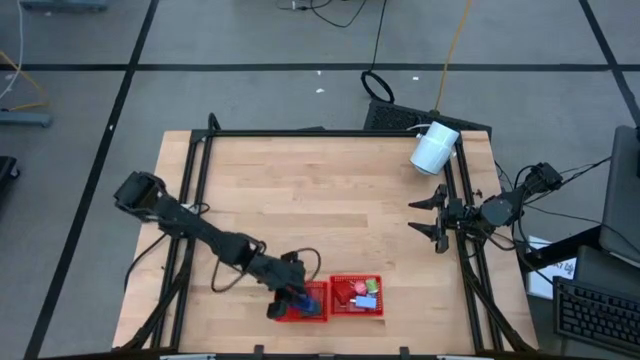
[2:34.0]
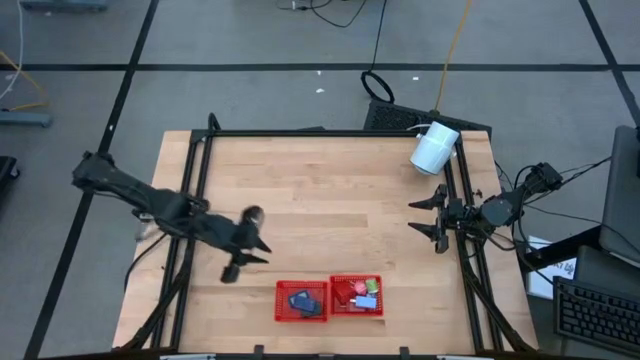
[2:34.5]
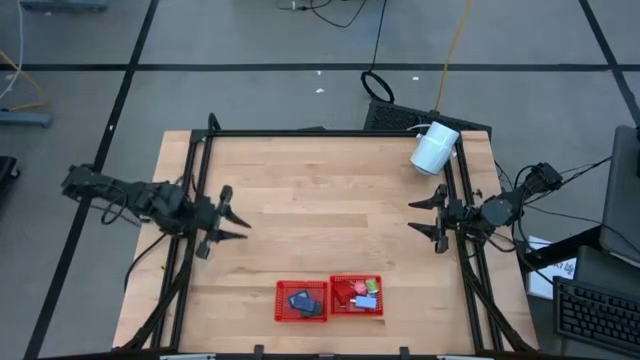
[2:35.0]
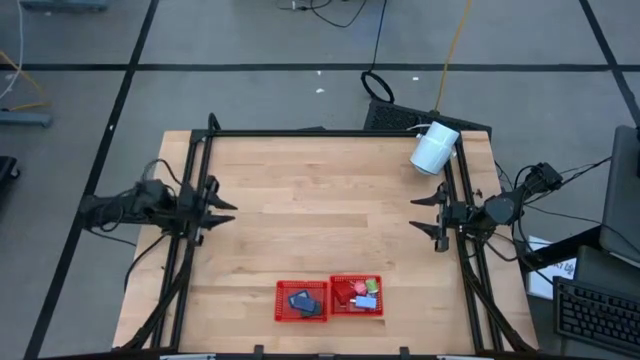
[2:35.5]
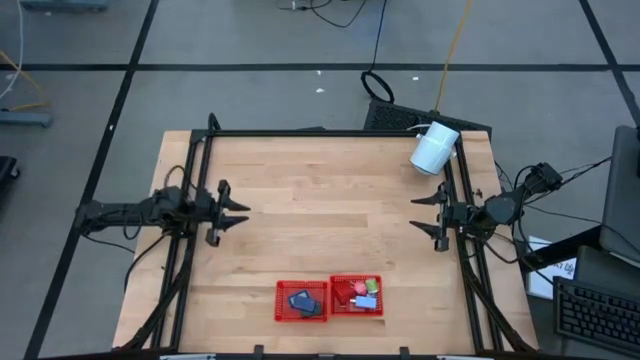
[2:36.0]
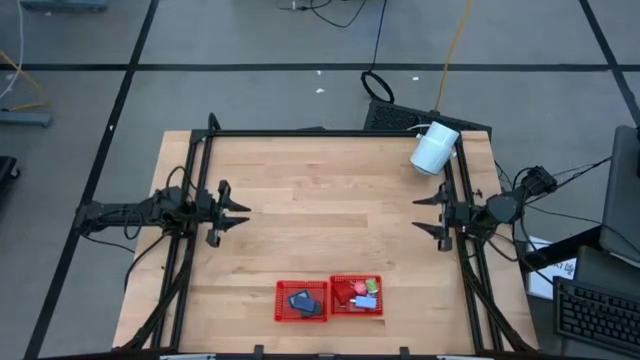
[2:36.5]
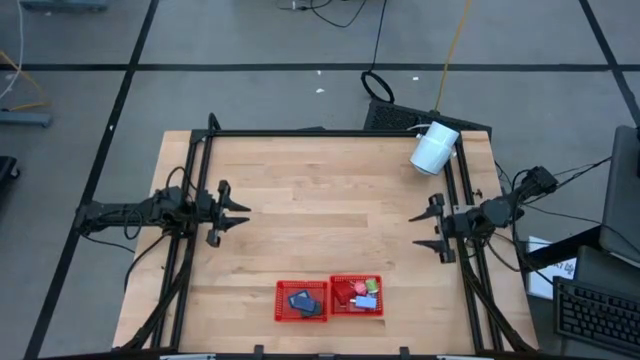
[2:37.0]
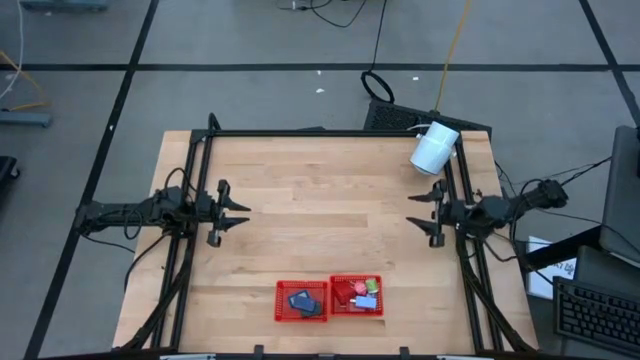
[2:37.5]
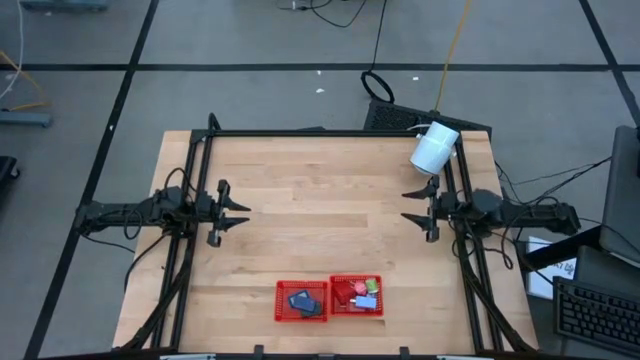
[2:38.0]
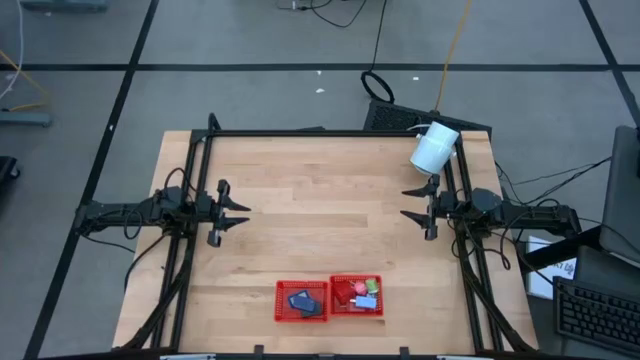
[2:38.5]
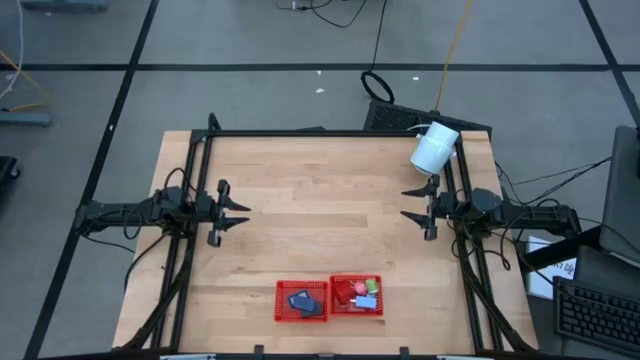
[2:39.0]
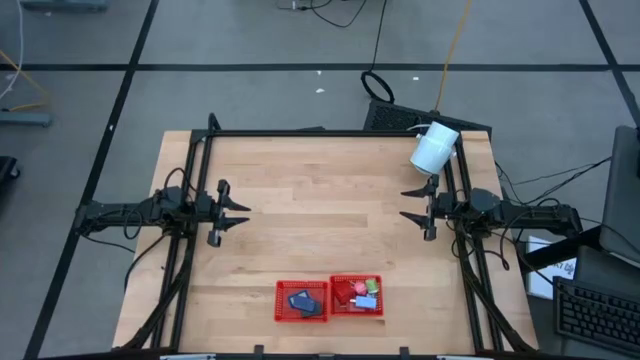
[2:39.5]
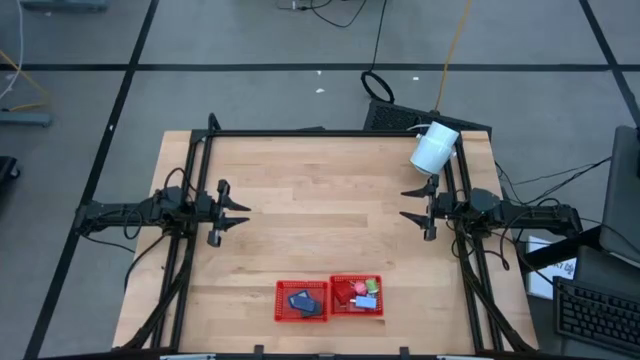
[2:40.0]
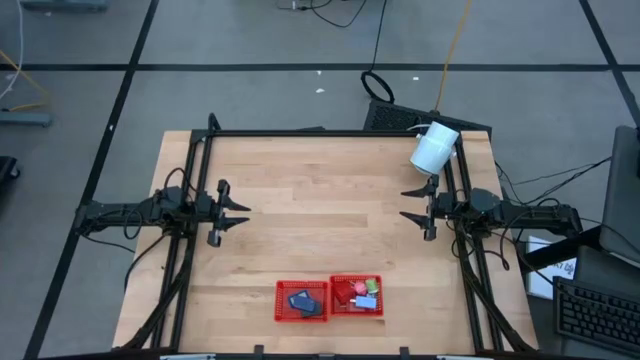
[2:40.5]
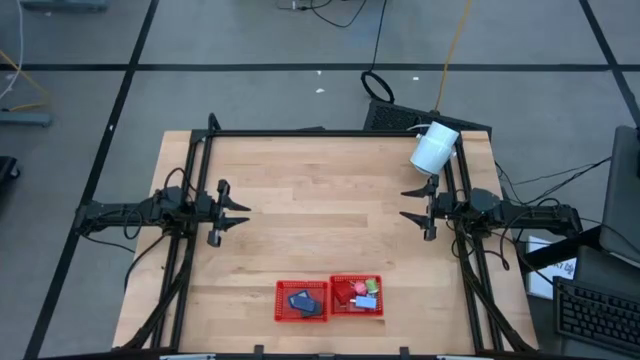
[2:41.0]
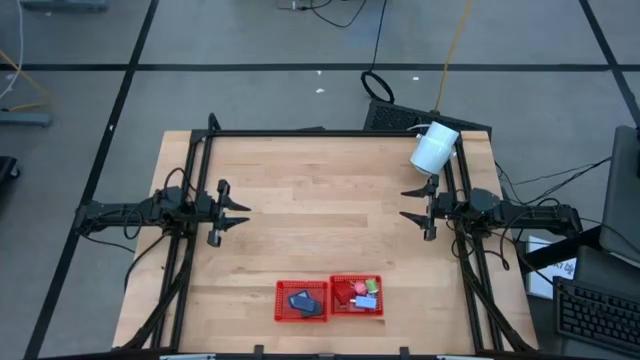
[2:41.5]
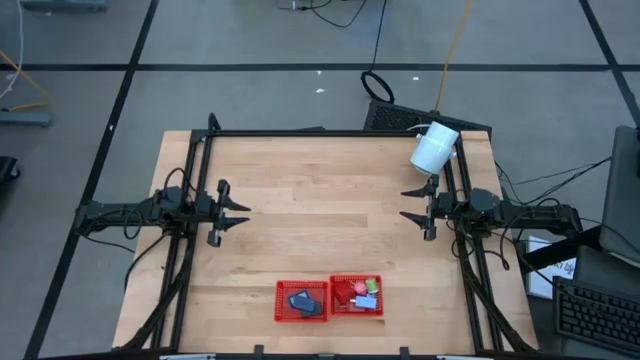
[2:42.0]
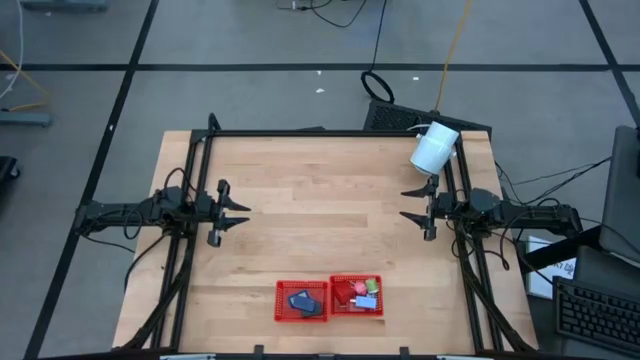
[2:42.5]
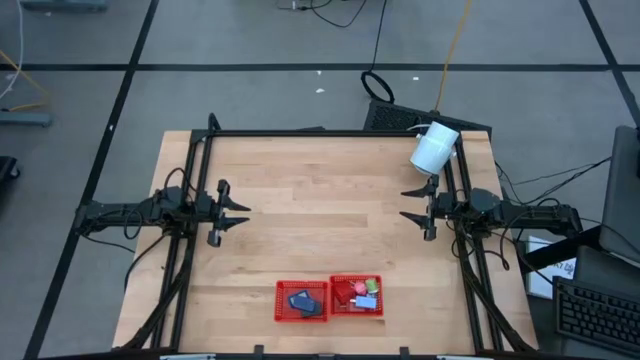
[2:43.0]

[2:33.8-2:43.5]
Task: Pick & Place Office items
Return to home position

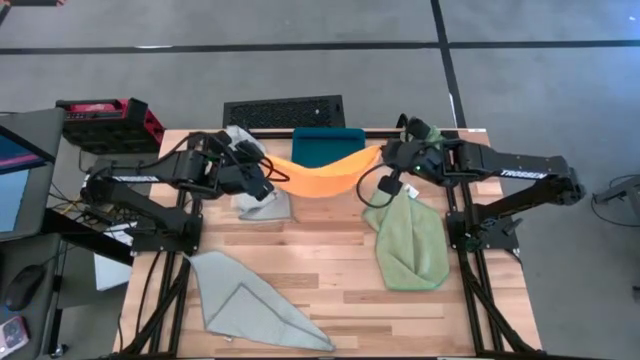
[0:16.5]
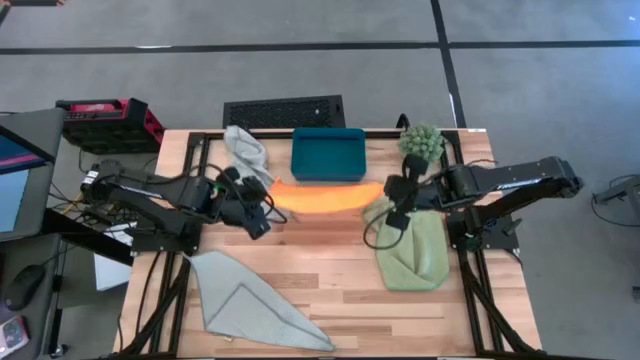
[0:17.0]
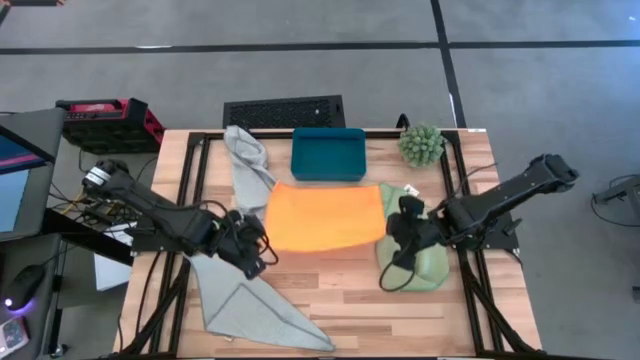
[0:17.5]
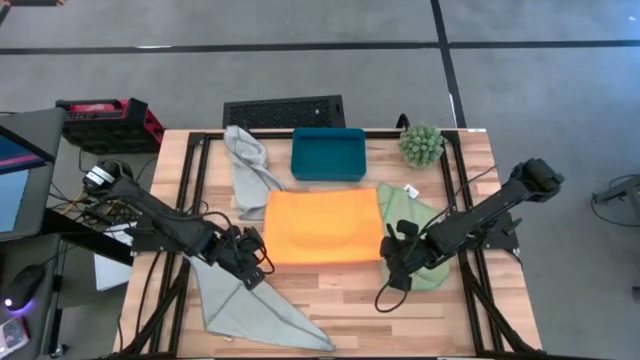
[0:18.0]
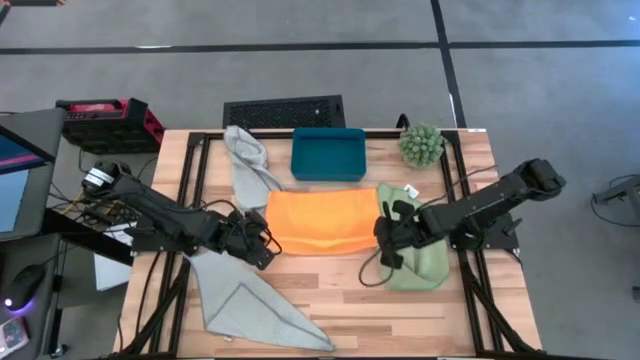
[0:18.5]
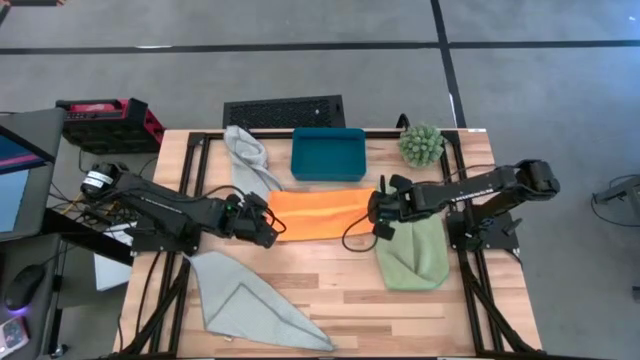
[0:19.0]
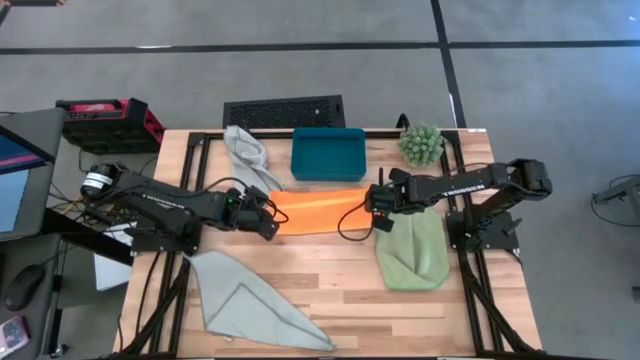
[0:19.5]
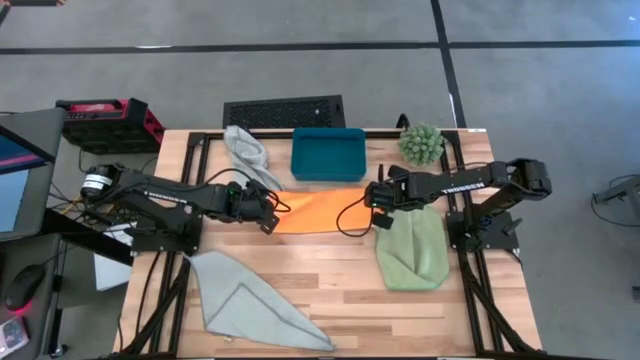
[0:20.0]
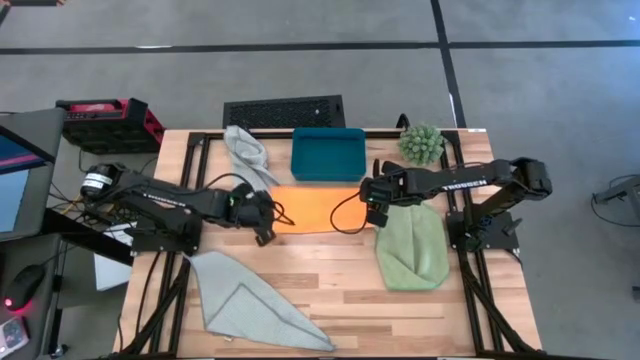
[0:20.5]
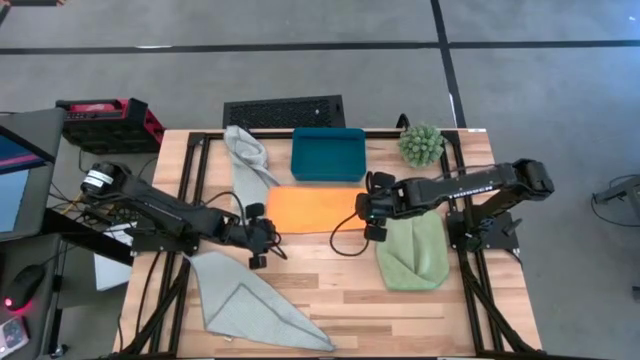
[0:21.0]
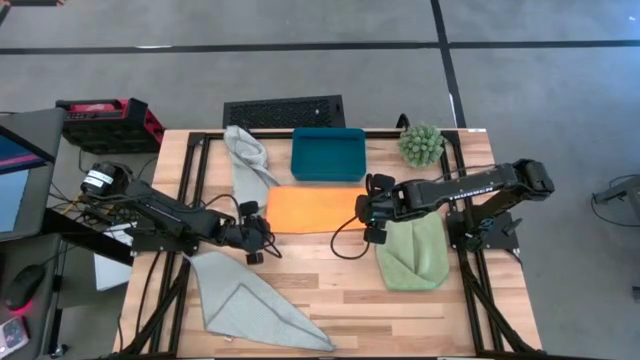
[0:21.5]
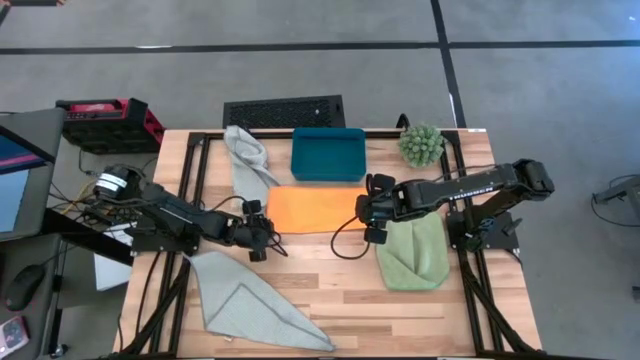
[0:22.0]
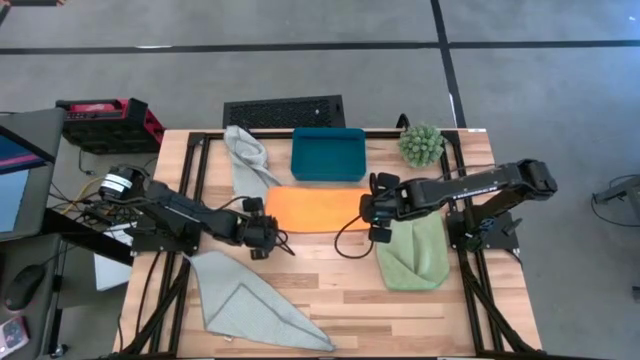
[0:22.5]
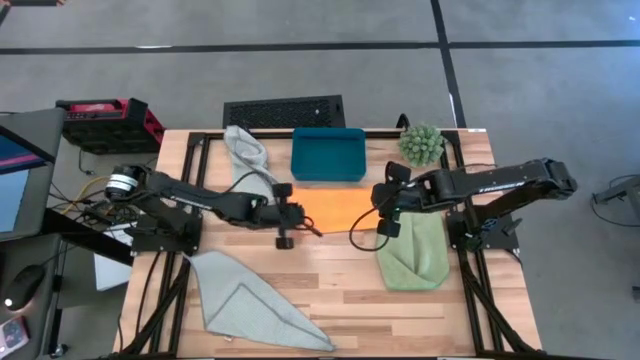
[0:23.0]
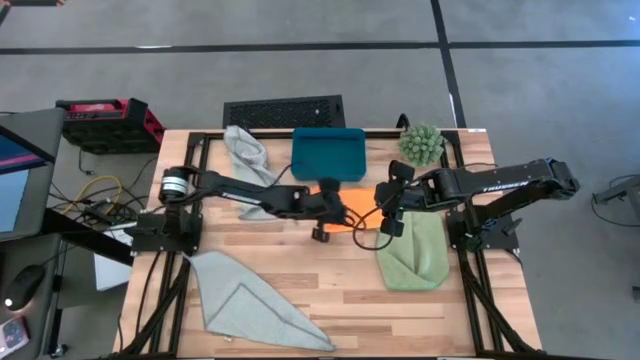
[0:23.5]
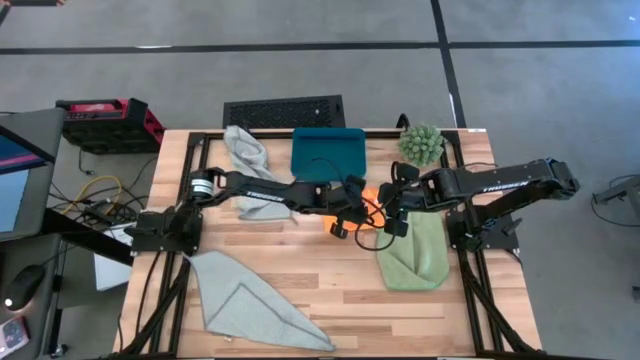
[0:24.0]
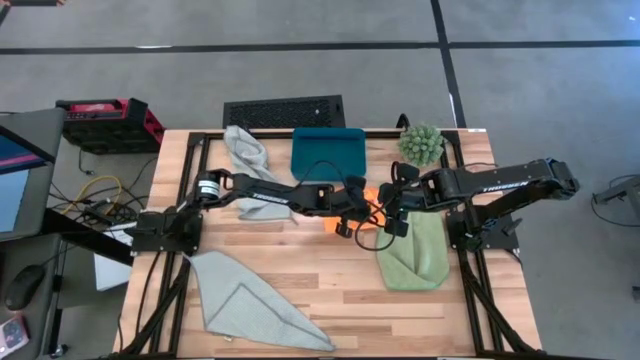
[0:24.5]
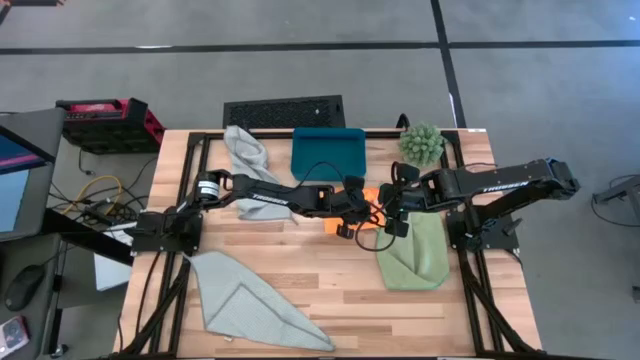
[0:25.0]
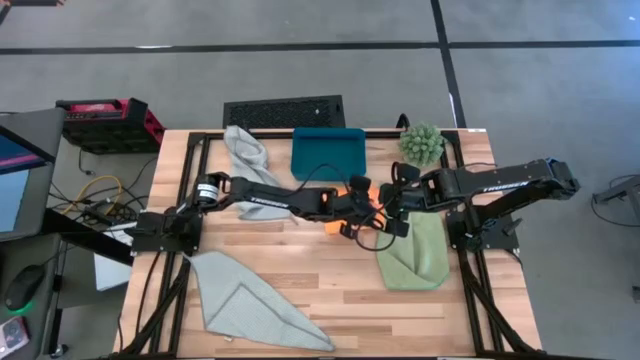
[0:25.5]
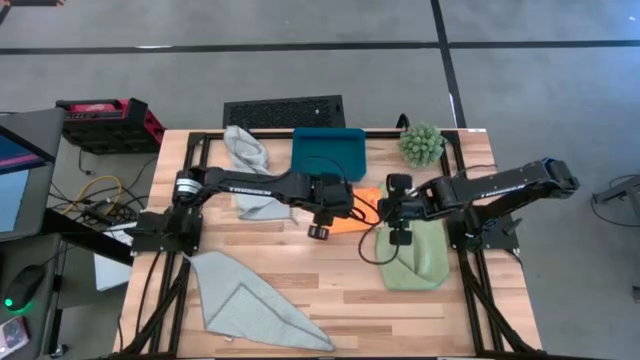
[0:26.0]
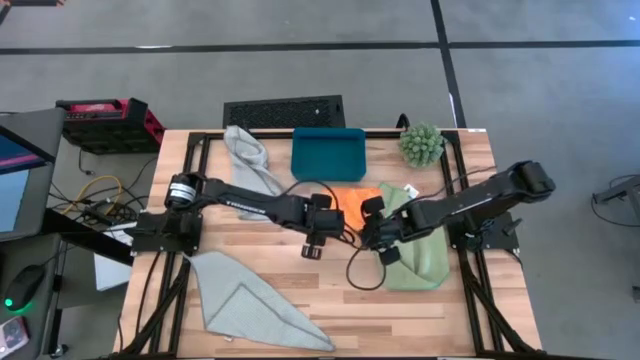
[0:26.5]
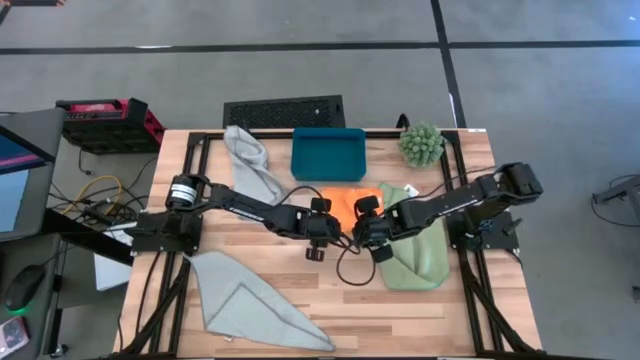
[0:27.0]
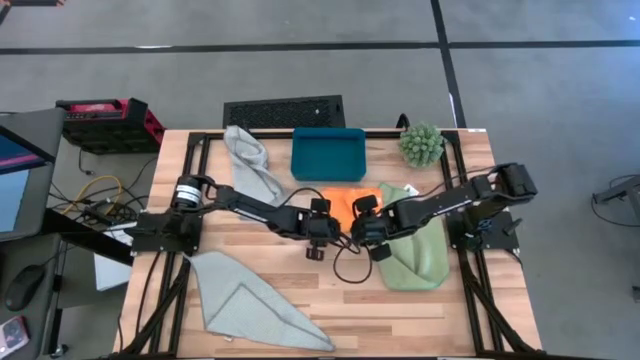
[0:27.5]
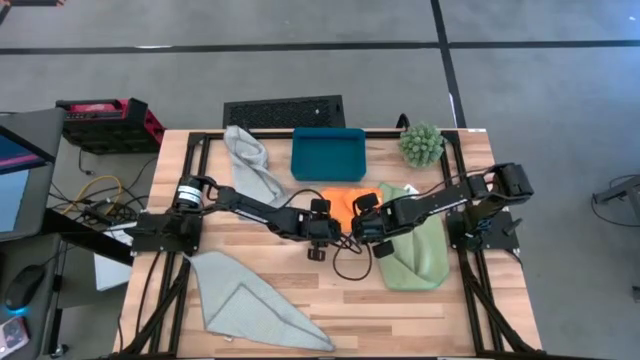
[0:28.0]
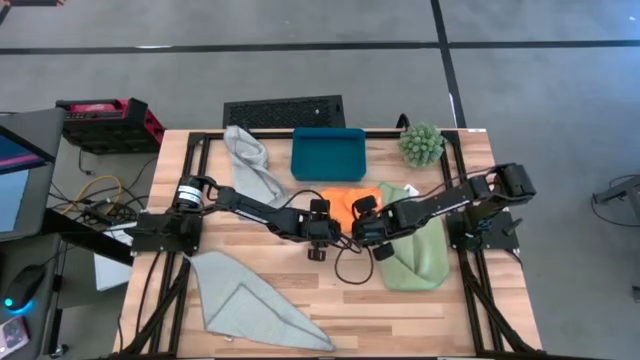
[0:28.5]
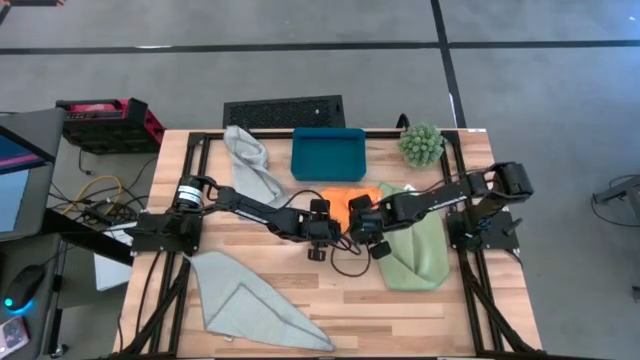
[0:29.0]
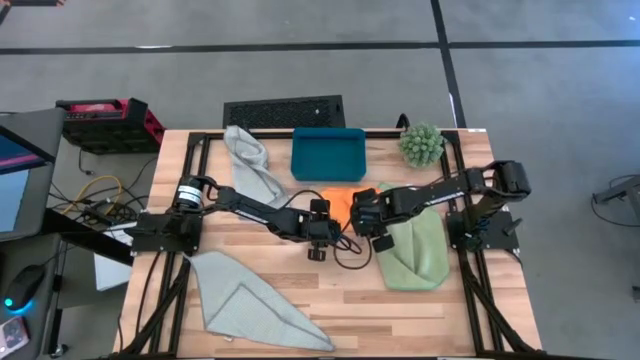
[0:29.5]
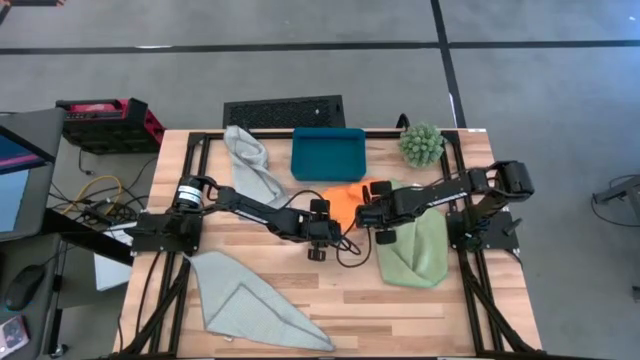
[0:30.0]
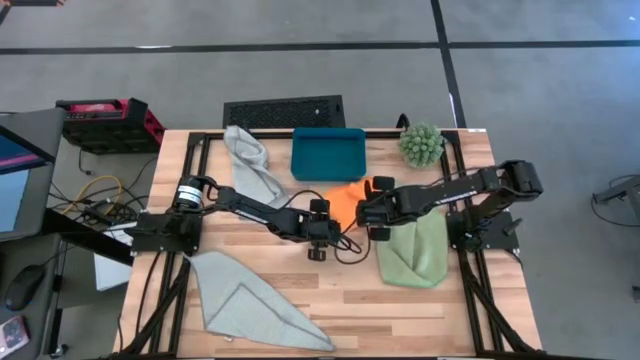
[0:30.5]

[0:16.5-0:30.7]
Task: Fold microfiber towels
Fold the orange microfiber cloth
